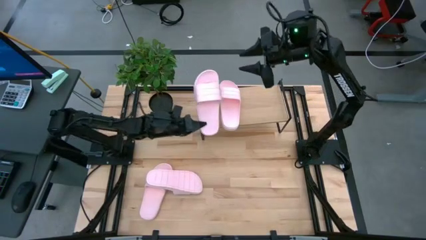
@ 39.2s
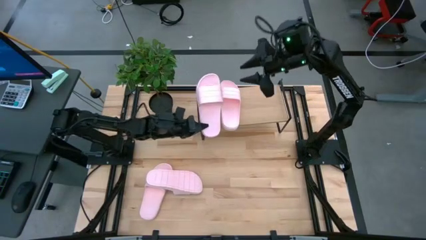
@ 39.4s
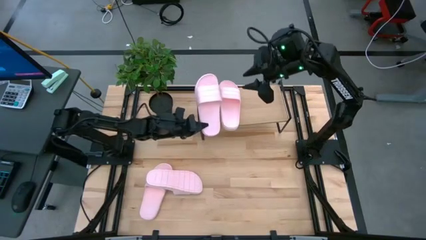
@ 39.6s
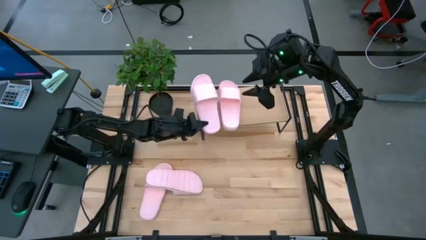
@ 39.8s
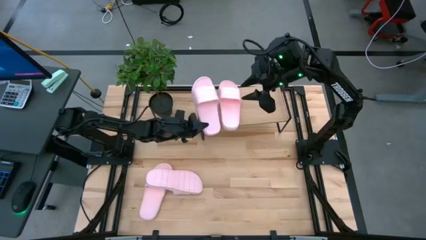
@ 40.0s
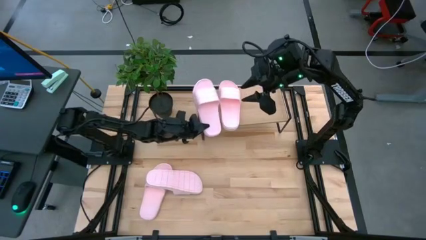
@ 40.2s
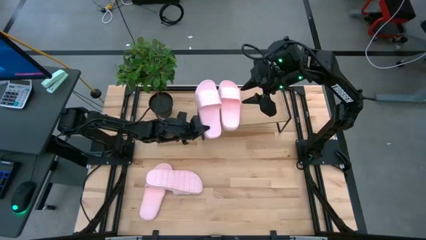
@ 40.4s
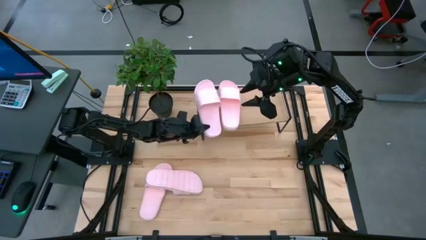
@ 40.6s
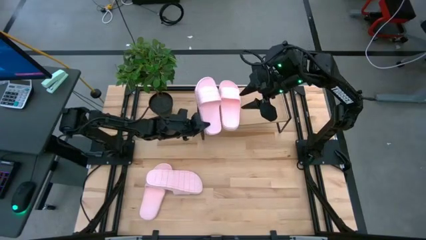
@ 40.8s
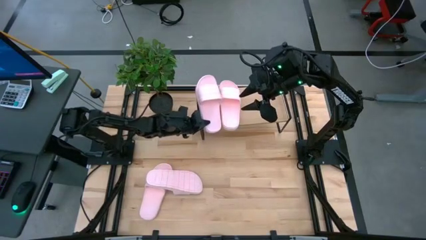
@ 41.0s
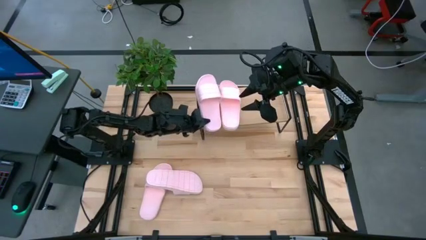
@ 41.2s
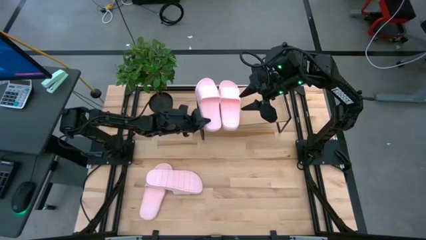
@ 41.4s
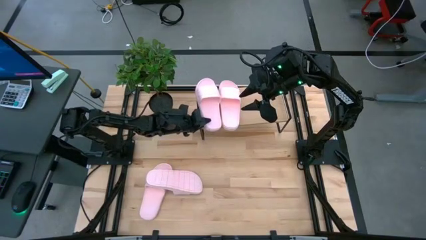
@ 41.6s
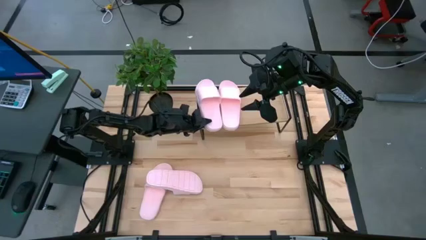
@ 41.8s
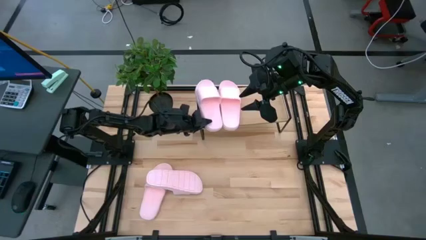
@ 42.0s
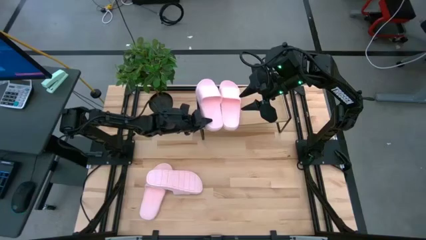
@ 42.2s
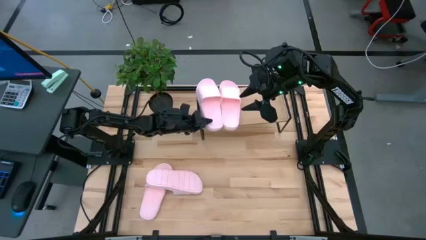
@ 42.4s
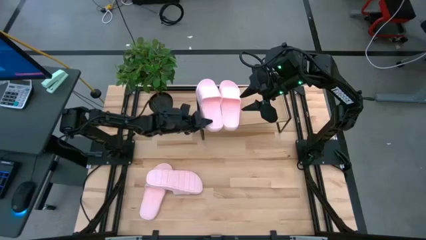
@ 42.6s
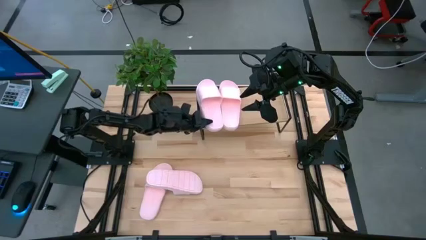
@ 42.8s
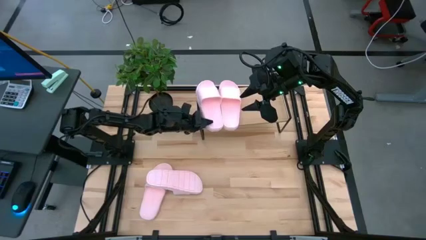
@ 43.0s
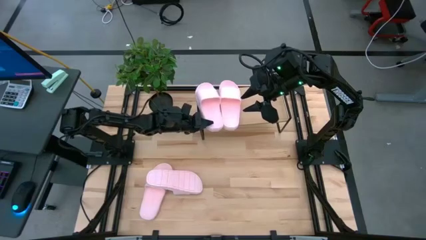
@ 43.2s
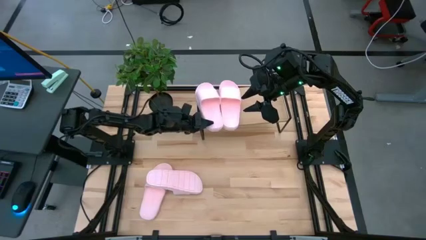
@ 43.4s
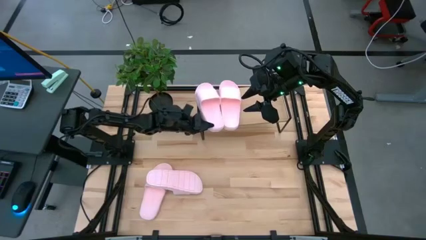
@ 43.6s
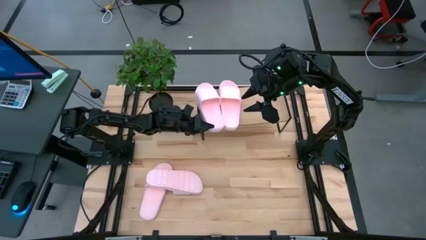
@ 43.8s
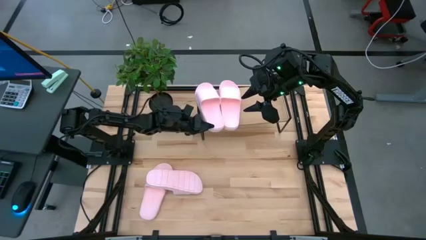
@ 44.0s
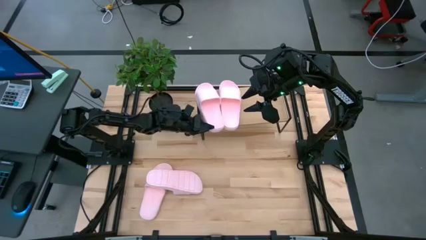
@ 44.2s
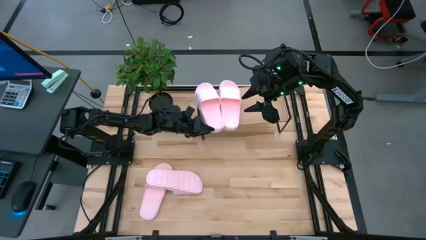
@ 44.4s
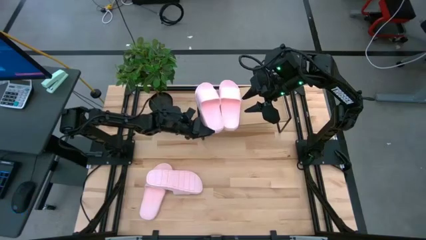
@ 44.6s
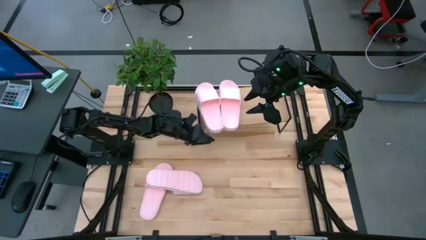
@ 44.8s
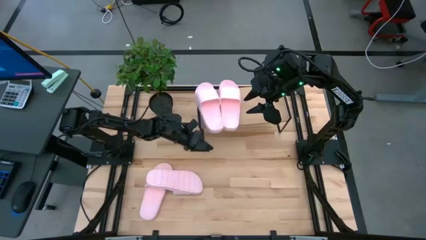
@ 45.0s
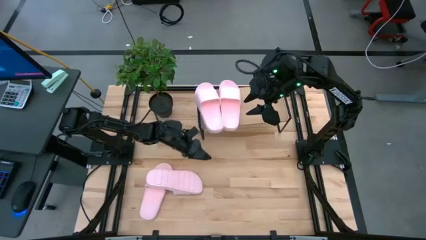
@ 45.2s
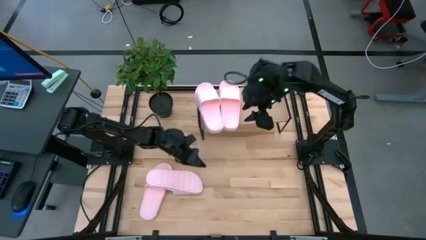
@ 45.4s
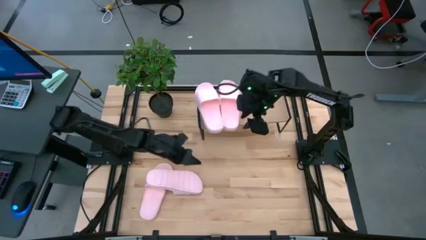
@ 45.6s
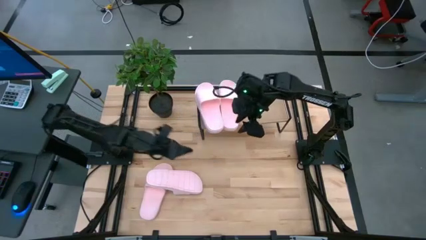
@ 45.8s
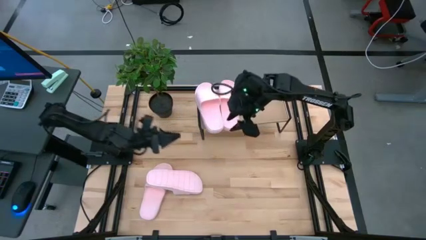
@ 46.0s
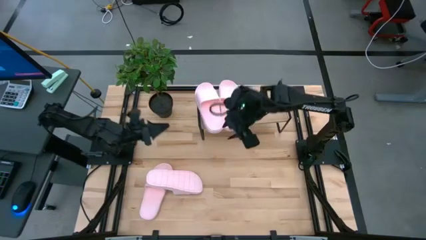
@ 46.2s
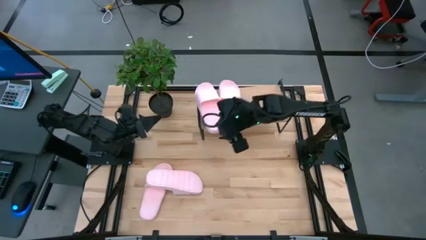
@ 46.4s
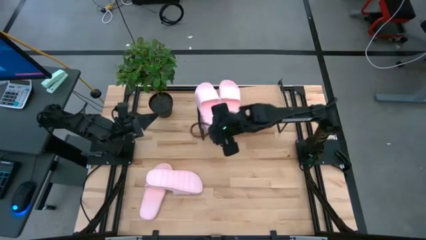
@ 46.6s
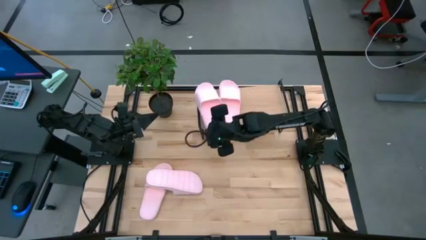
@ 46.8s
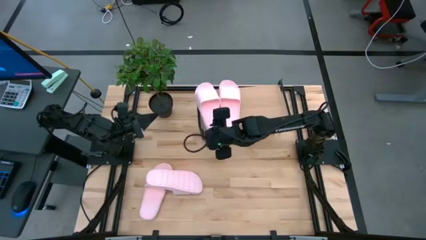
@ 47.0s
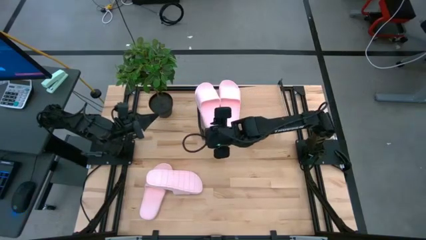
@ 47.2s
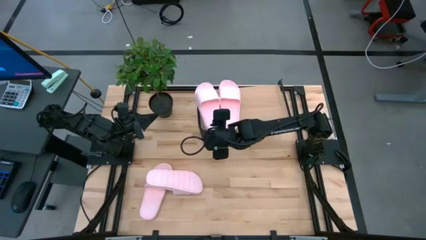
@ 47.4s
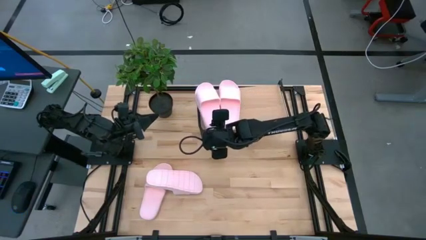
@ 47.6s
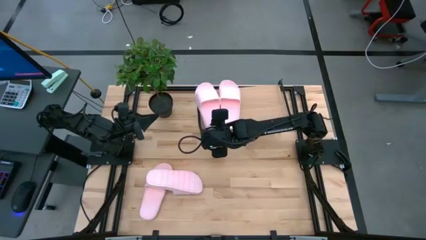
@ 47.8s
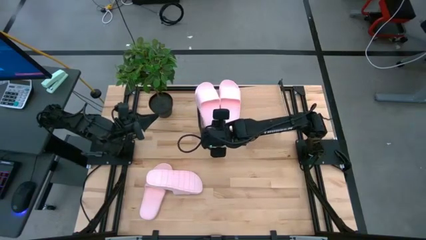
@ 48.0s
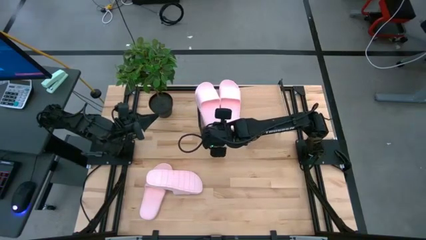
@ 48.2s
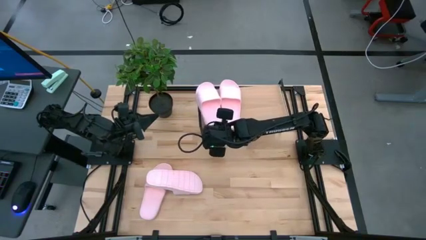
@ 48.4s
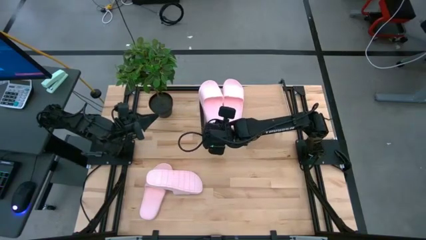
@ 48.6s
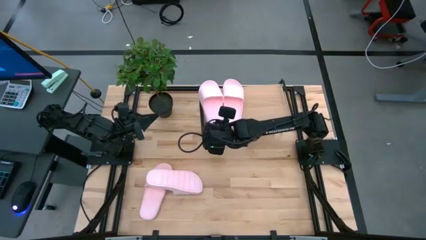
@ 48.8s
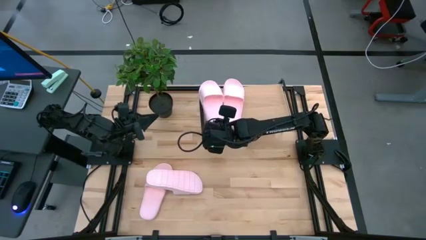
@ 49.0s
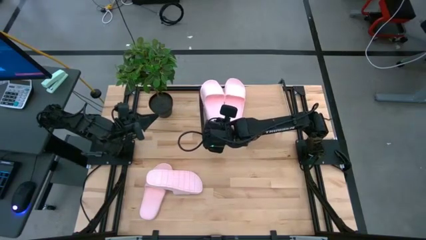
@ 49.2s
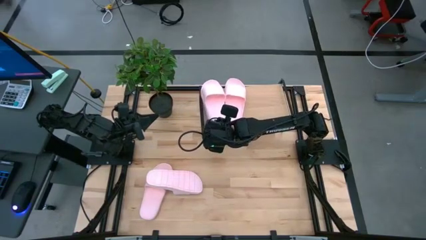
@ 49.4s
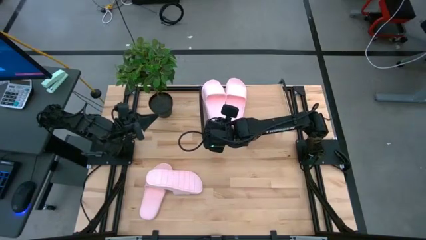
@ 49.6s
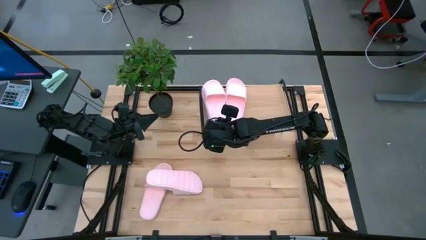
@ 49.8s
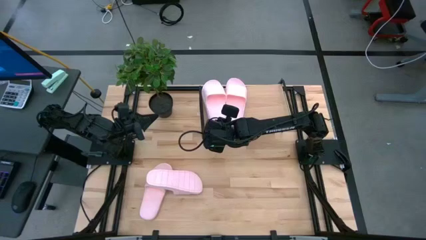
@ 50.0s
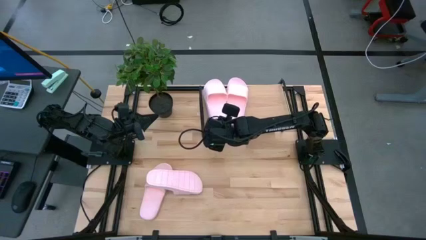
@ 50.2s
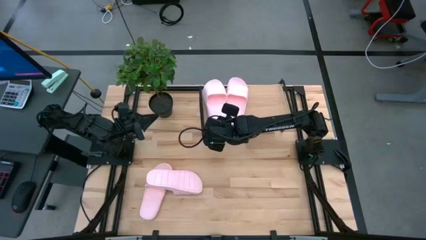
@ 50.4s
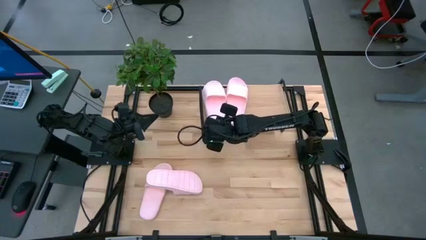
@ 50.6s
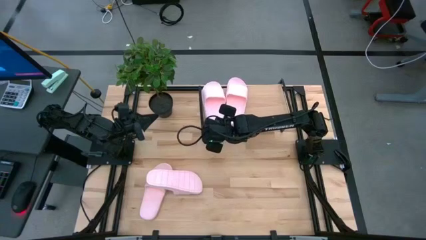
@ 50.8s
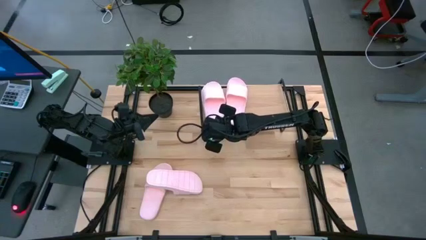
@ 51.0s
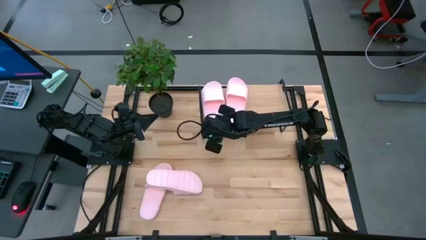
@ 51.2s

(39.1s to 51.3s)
Task: Pick and place slides into the shelf
Put the right pink slide on the shelf

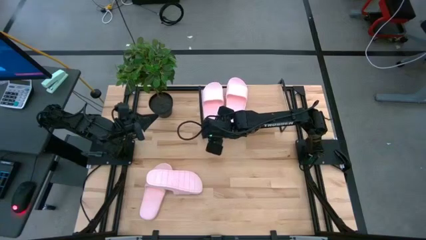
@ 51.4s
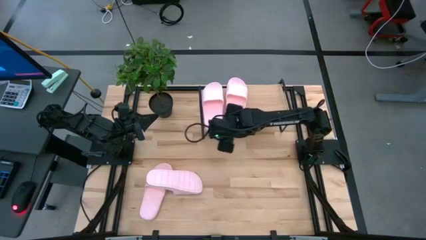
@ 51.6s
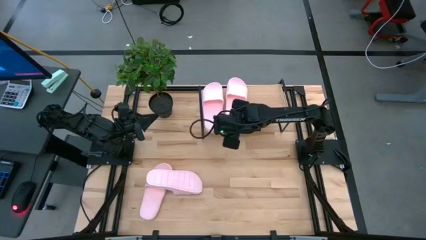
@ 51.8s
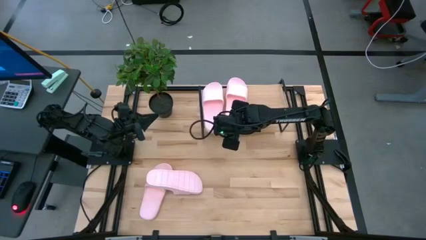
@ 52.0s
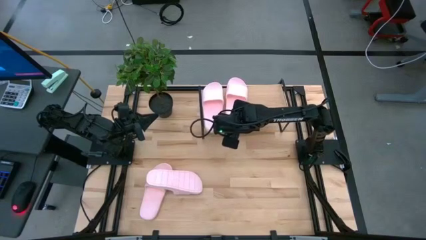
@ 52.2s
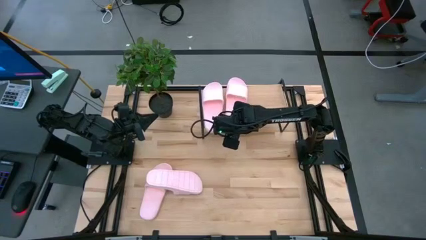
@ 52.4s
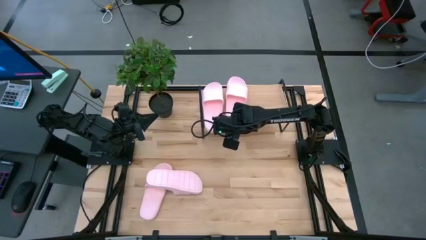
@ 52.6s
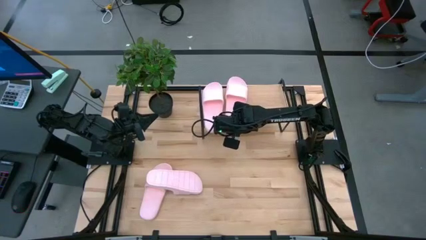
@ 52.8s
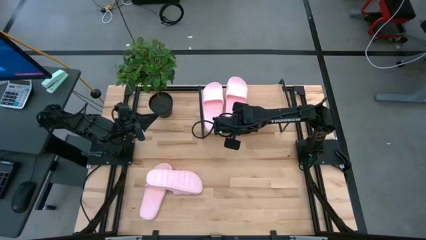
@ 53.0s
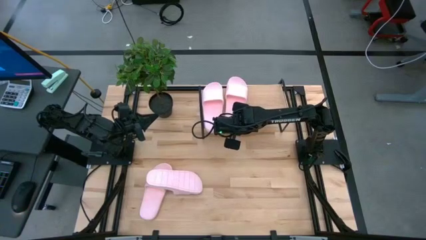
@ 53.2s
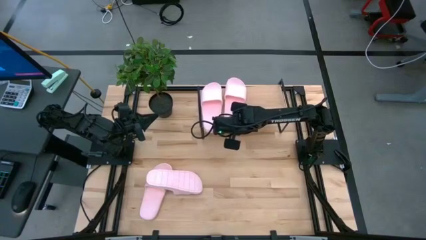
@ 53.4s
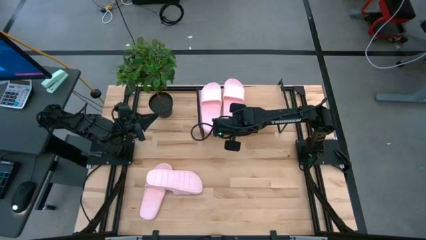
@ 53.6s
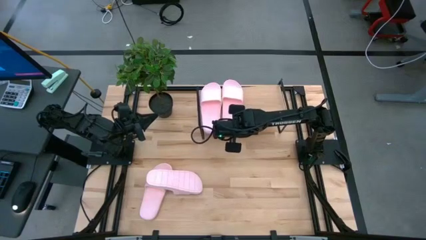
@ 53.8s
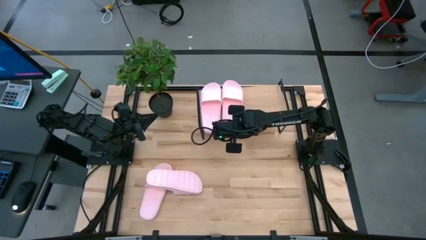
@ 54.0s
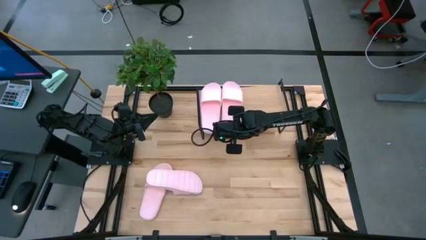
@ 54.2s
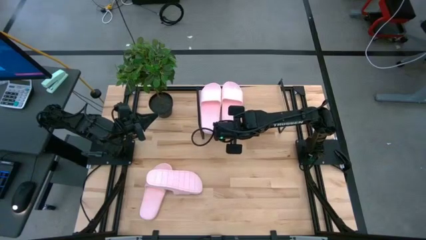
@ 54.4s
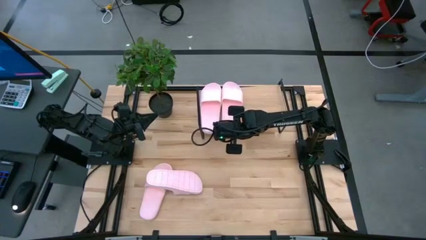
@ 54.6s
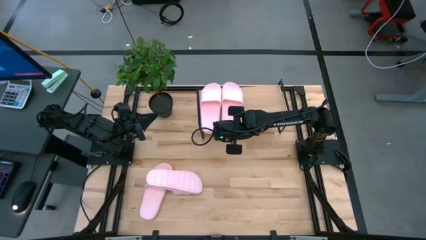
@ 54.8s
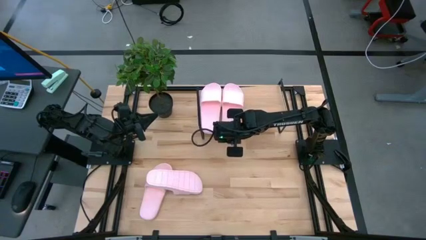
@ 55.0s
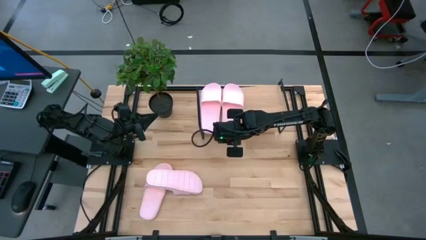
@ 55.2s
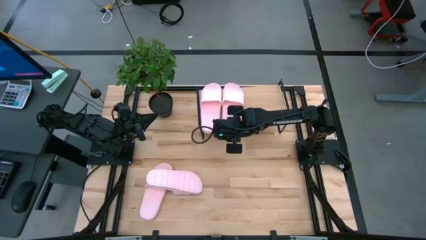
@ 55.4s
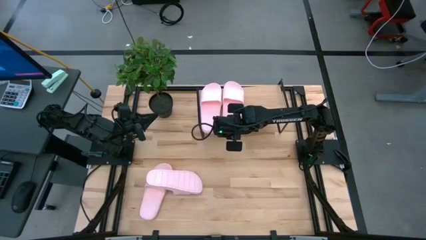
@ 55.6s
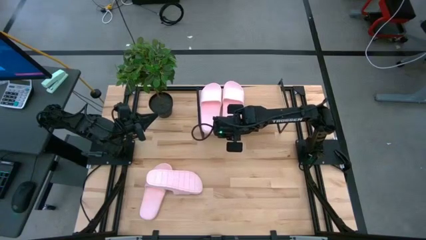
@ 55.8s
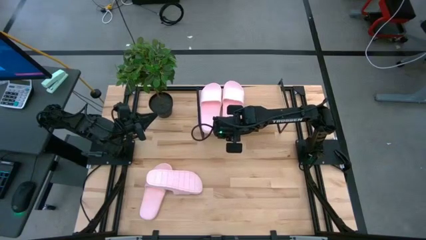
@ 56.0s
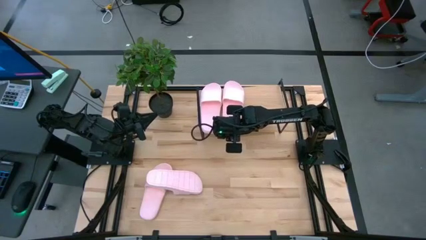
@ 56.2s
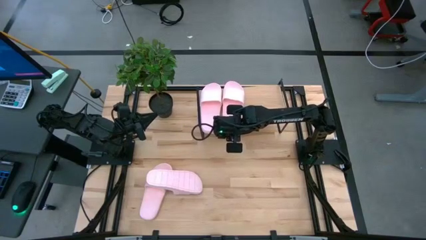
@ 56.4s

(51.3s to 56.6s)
Adjust the right pink slide on the shelf
